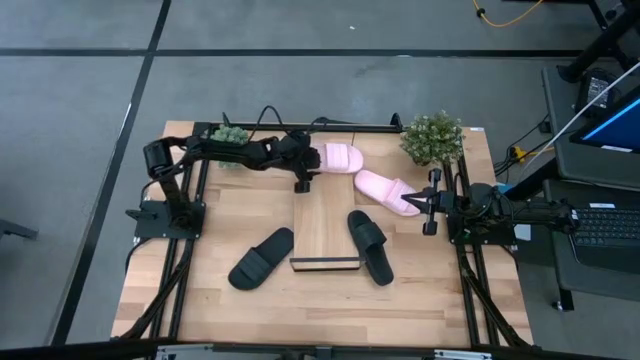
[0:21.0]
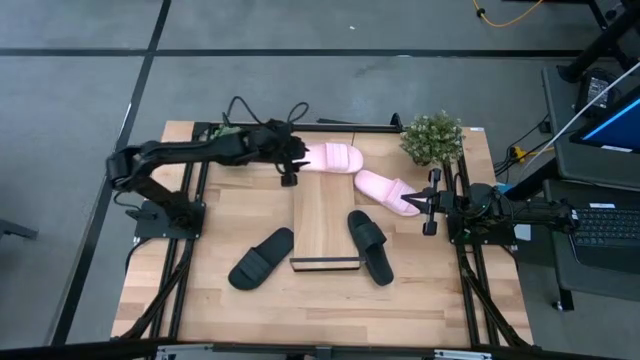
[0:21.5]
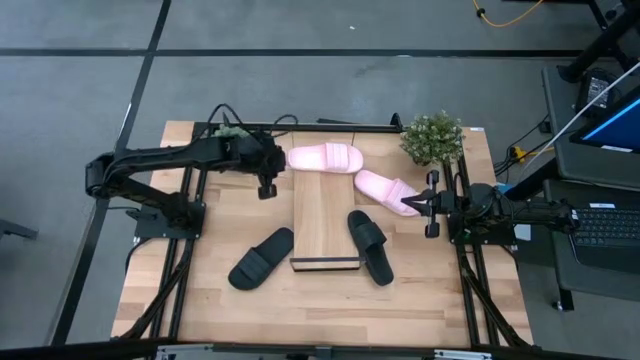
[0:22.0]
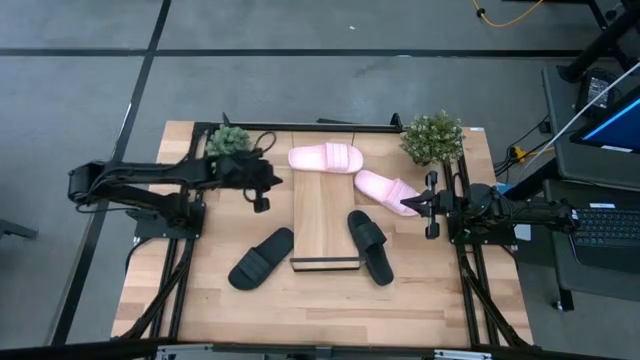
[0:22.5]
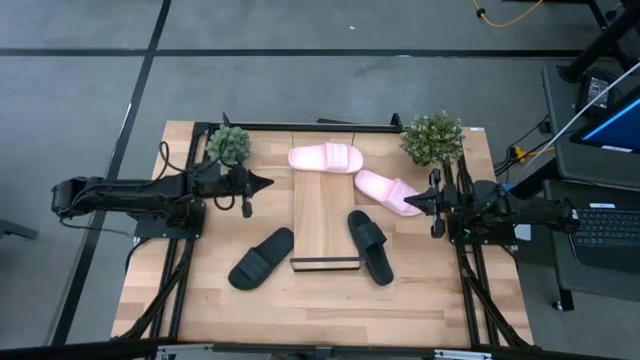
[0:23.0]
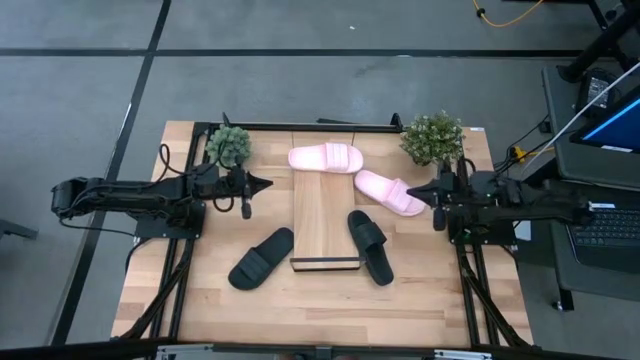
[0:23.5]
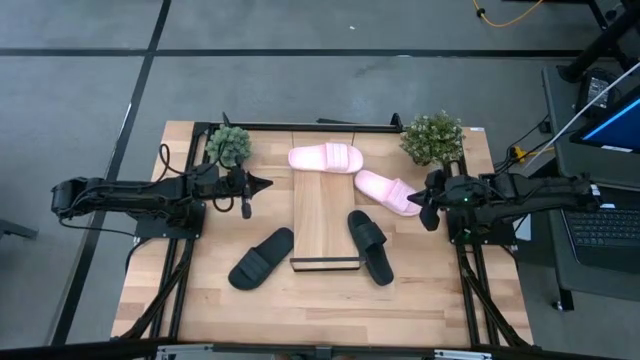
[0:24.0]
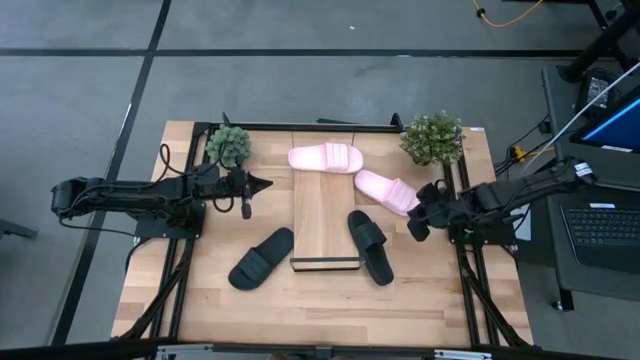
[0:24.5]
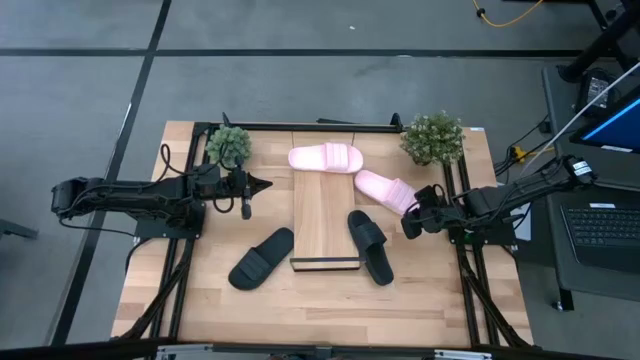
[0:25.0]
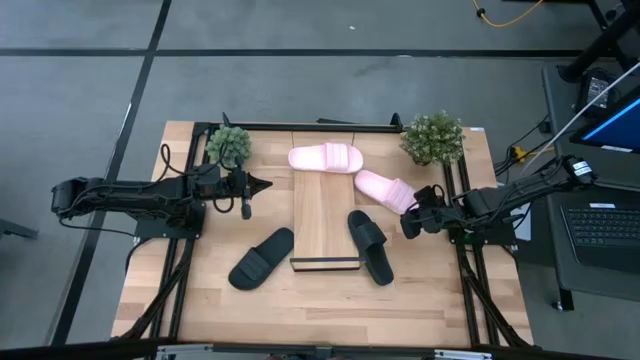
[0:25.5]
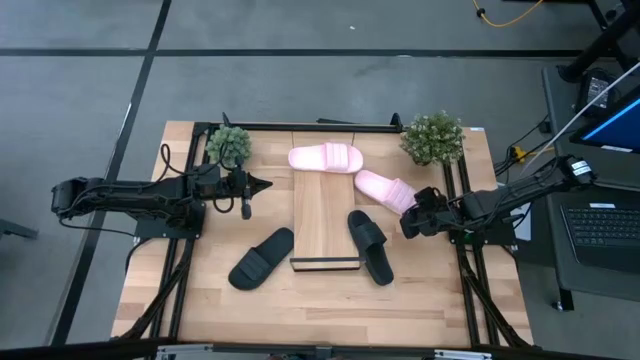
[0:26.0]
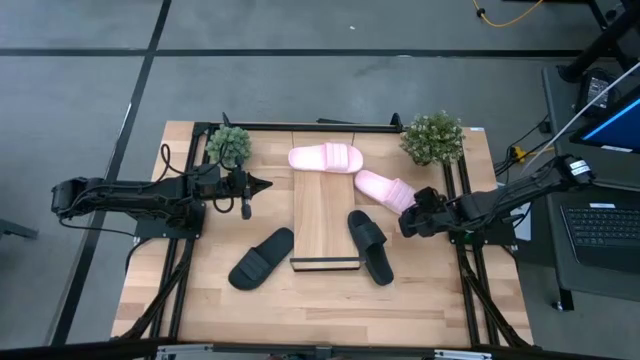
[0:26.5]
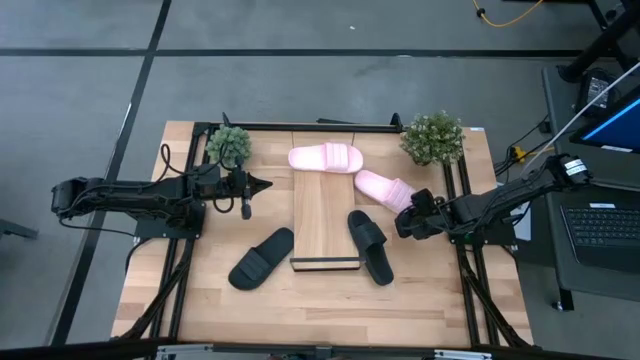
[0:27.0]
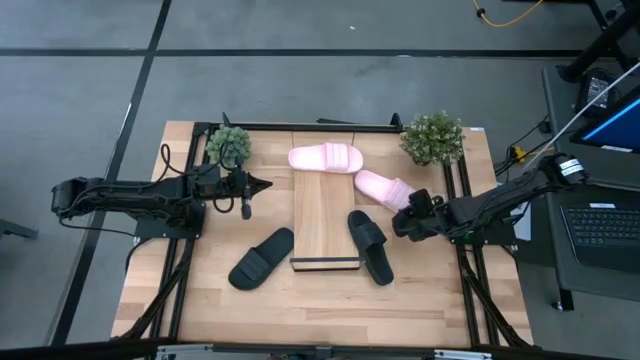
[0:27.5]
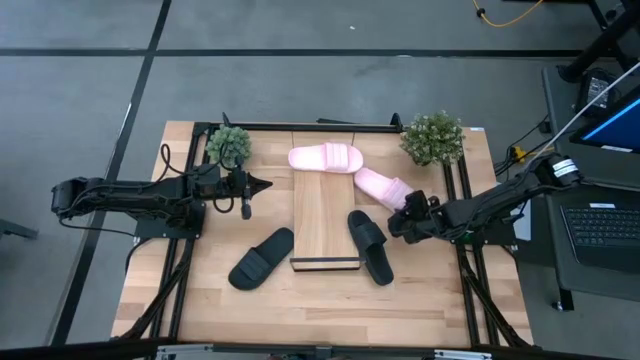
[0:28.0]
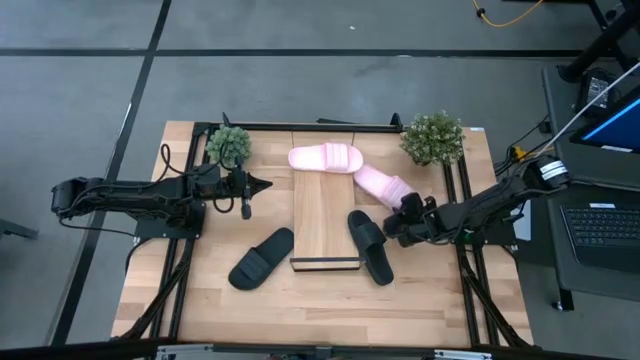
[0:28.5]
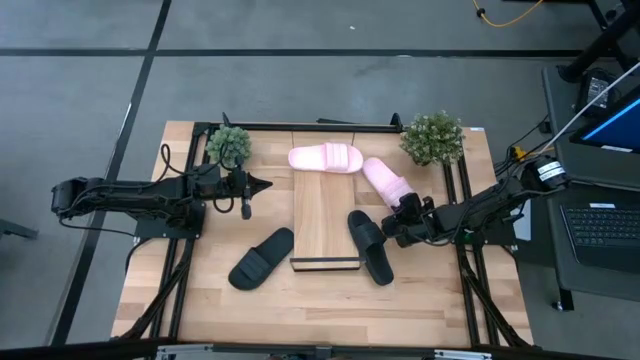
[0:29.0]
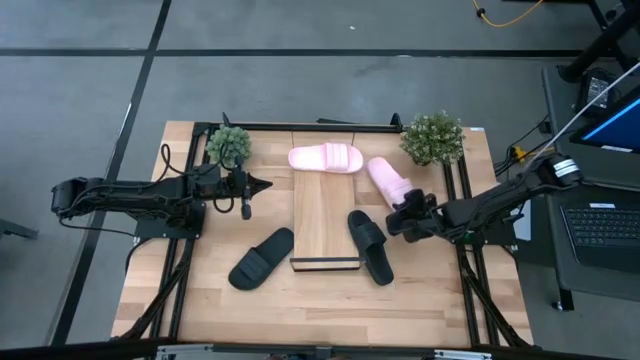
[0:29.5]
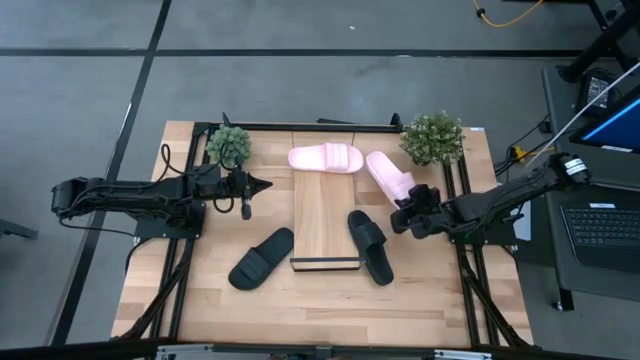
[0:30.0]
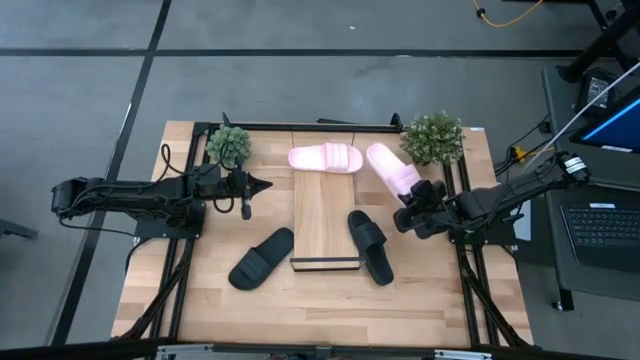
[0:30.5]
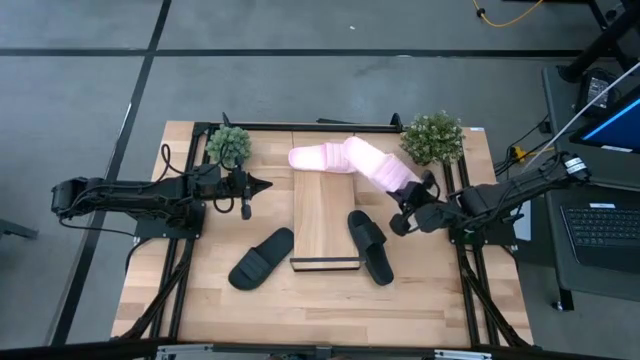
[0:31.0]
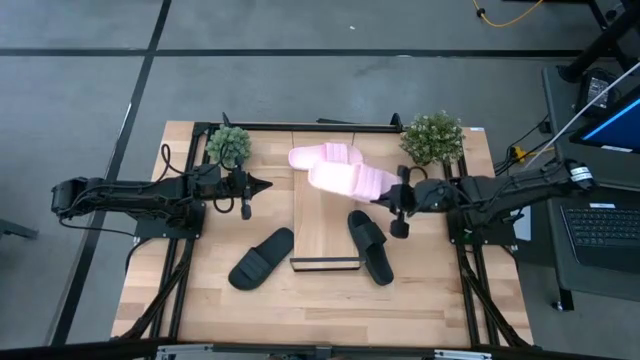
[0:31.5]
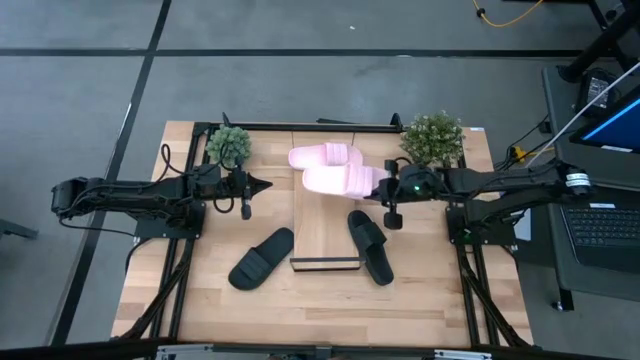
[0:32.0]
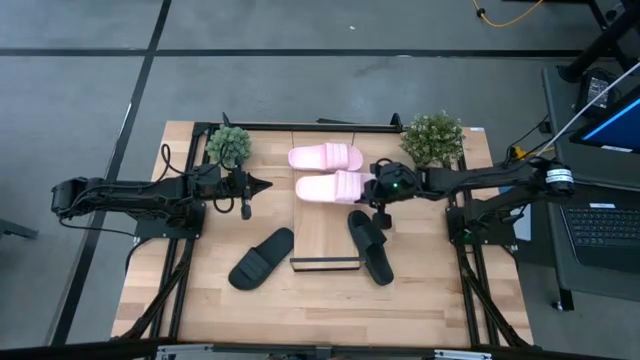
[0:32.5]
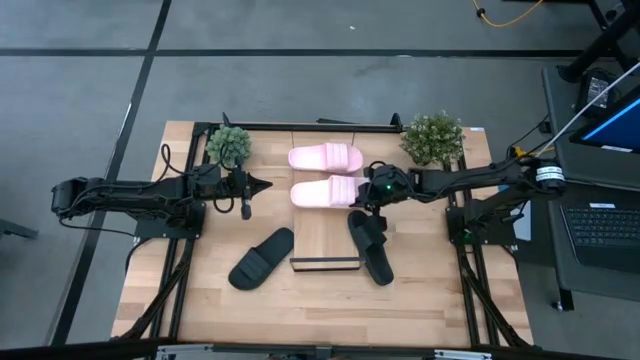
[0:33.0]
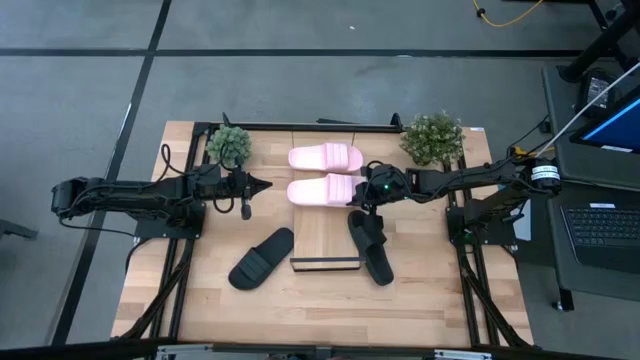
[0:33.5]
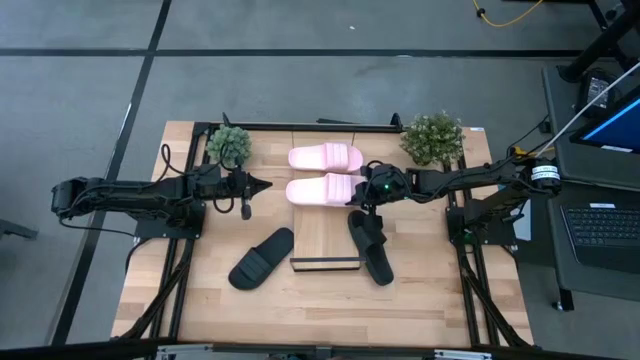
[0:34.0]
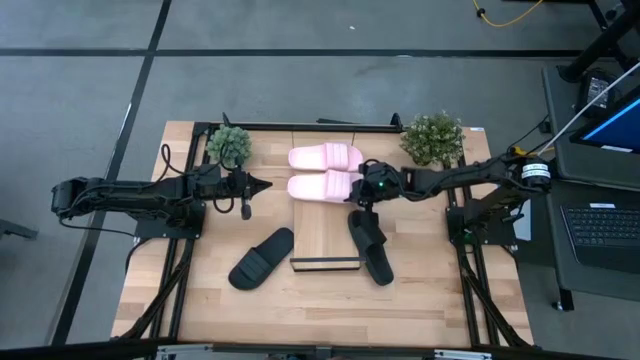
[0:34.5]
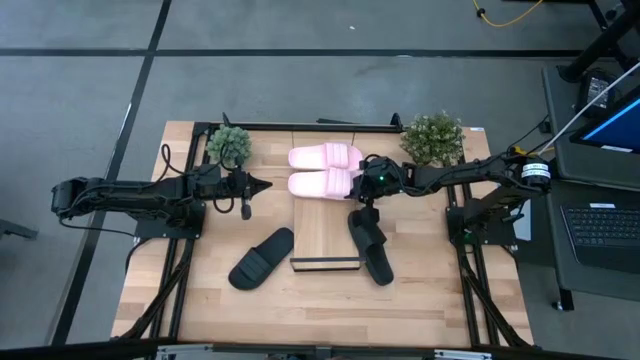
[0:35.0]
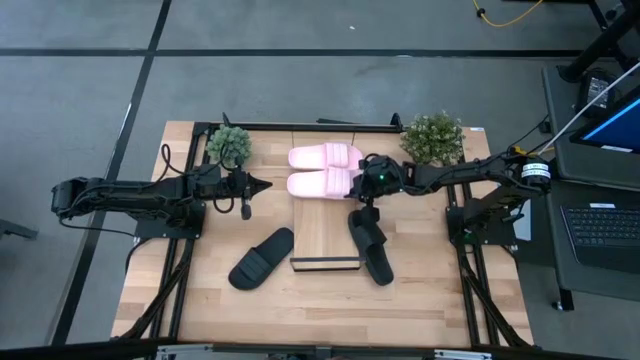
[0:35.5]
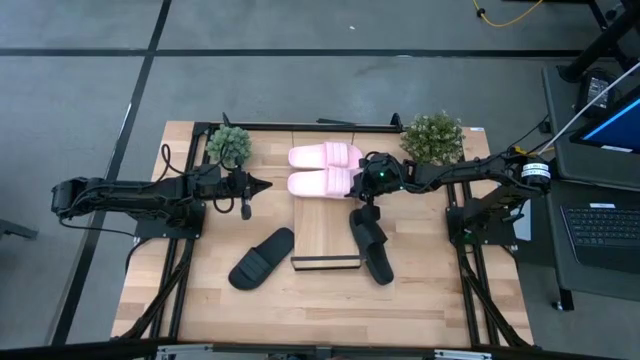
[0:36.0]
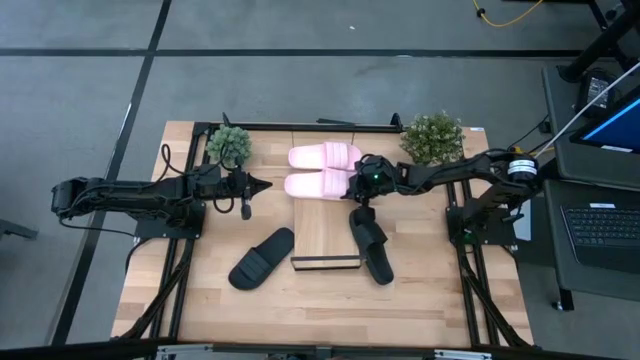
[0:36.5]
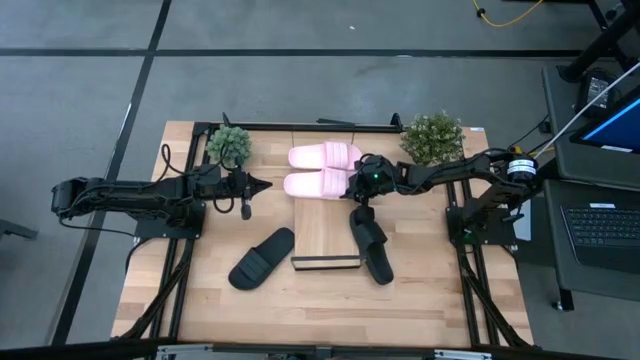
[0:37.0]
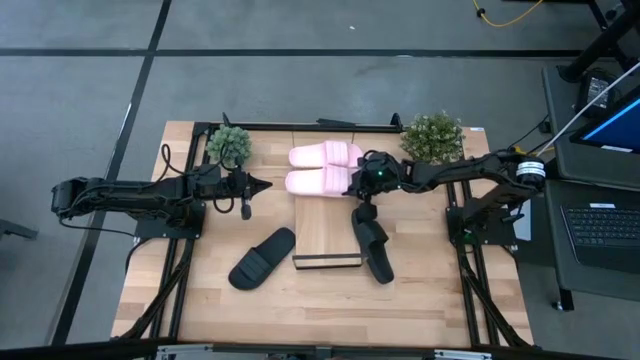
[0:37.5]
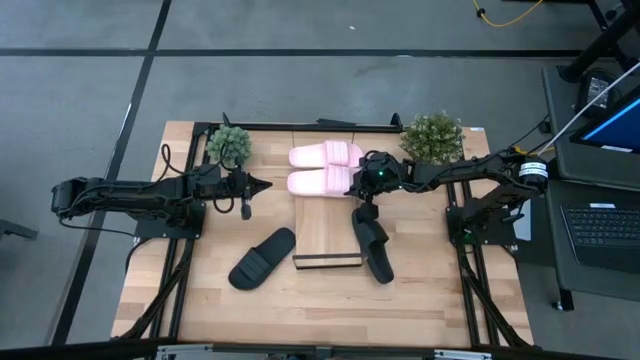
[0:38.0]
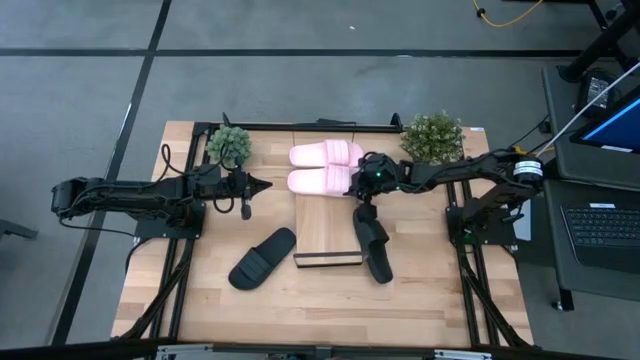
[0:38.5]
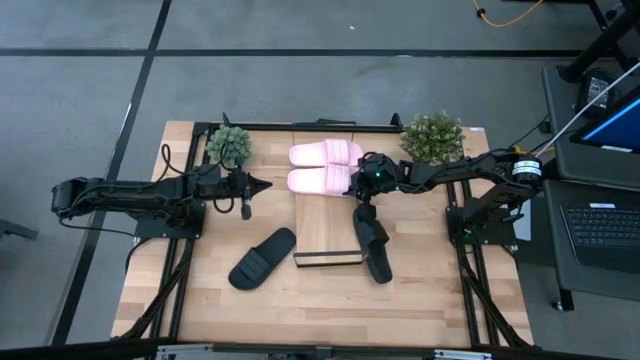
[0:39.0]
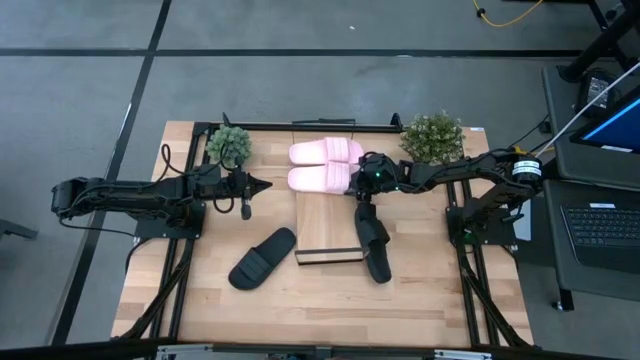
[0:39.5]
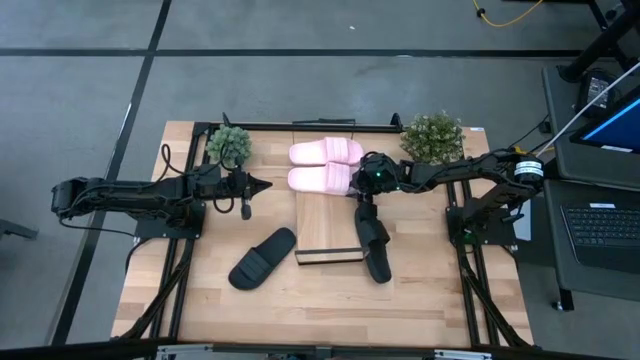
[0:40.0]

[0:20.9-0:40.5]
Task: Pick and place slides into the shelf
Put the pink slides on the shelf
